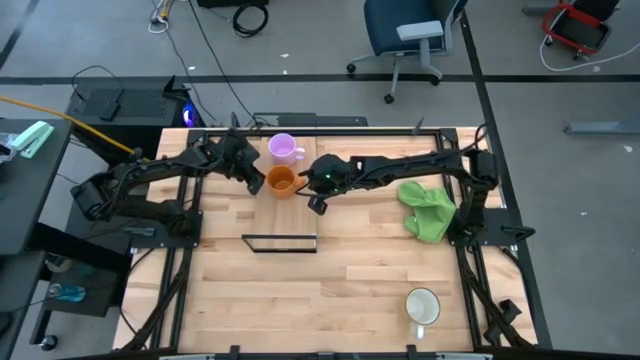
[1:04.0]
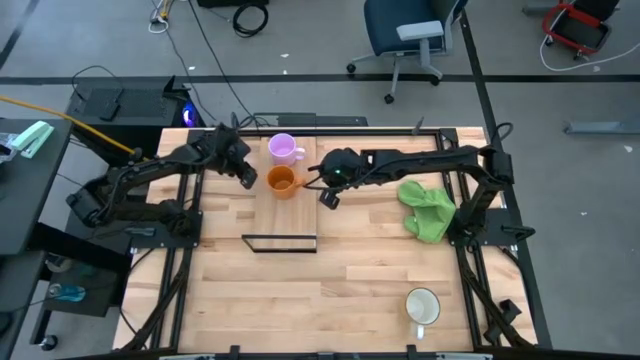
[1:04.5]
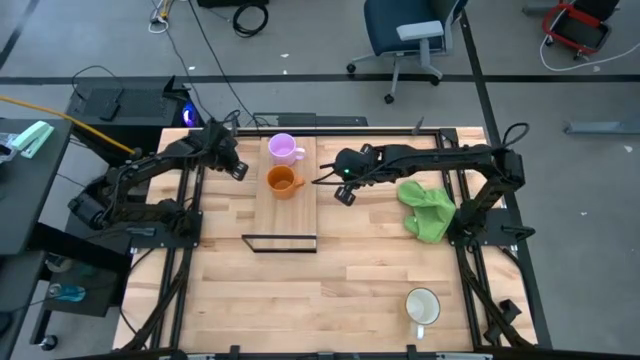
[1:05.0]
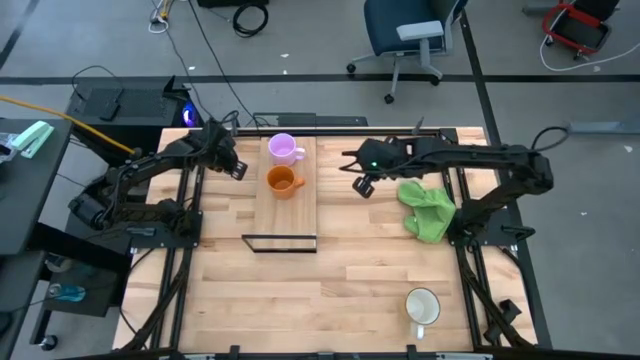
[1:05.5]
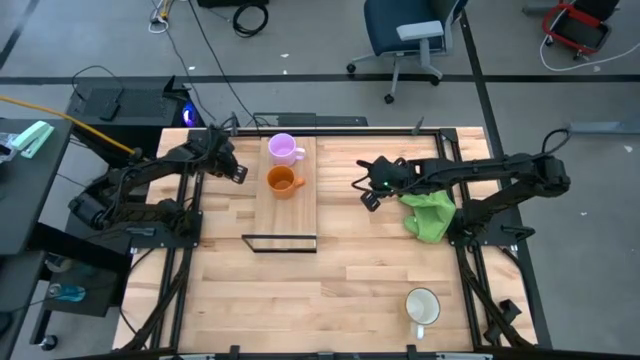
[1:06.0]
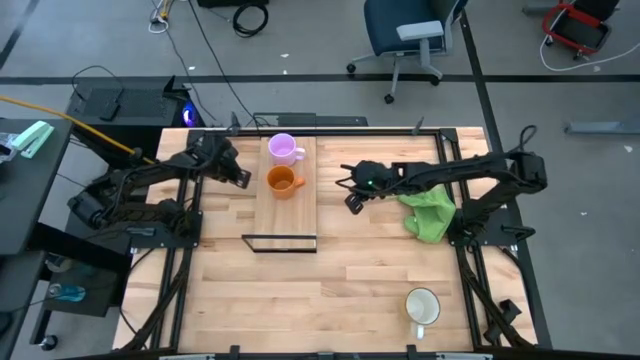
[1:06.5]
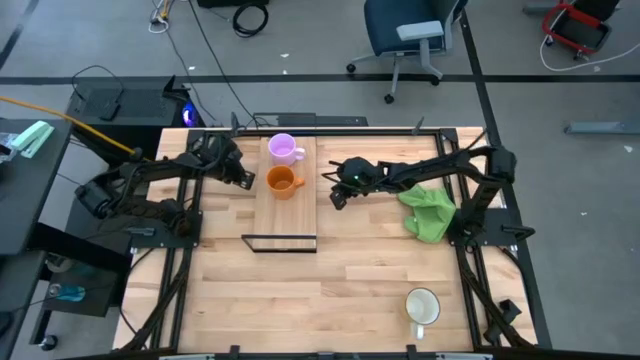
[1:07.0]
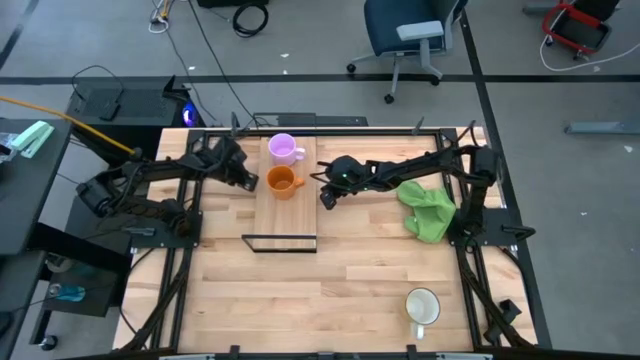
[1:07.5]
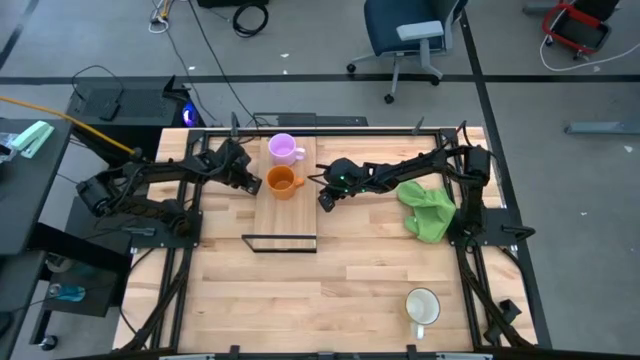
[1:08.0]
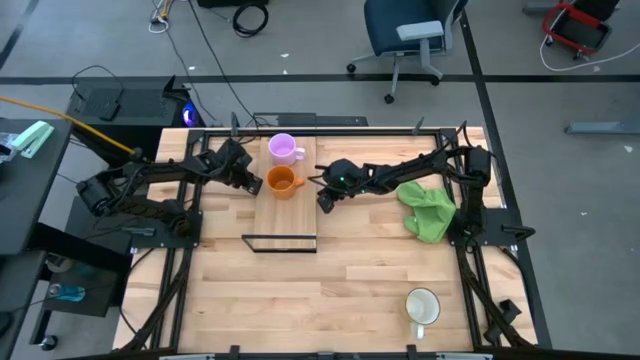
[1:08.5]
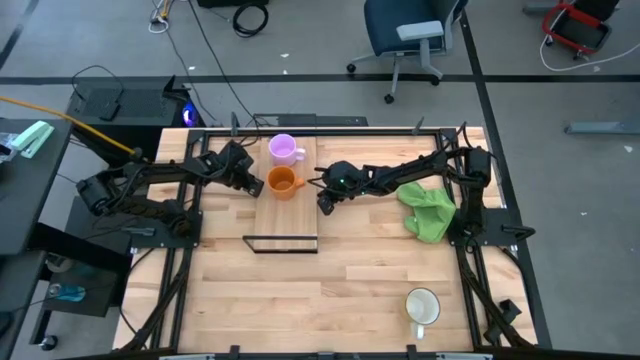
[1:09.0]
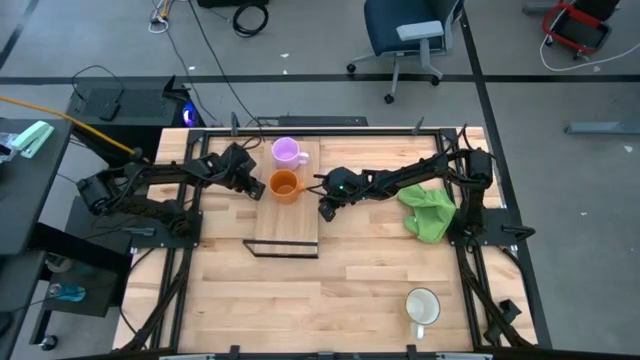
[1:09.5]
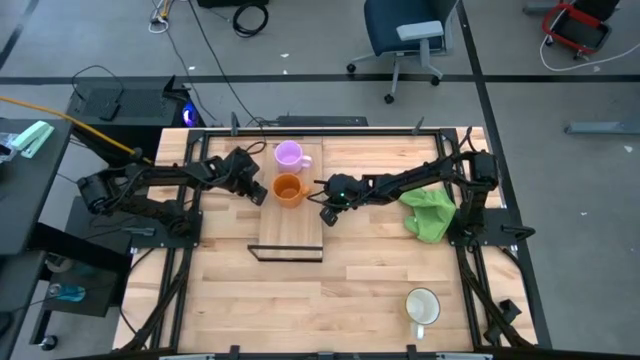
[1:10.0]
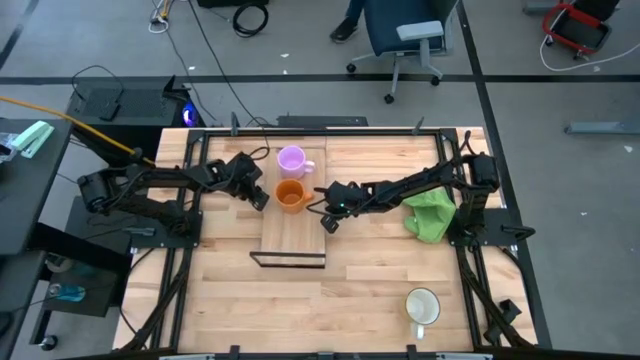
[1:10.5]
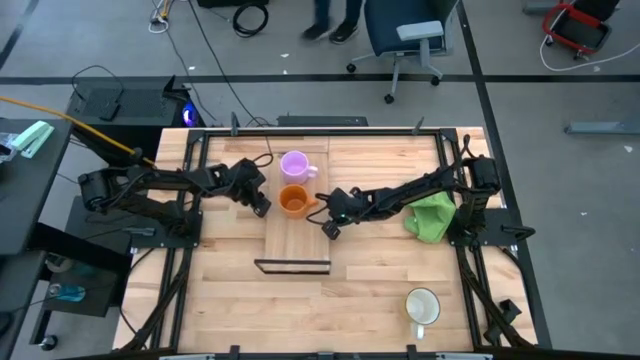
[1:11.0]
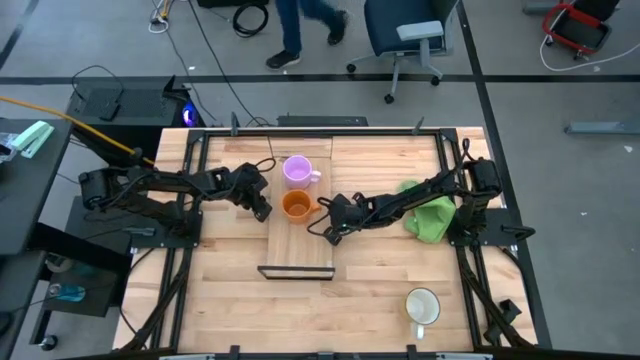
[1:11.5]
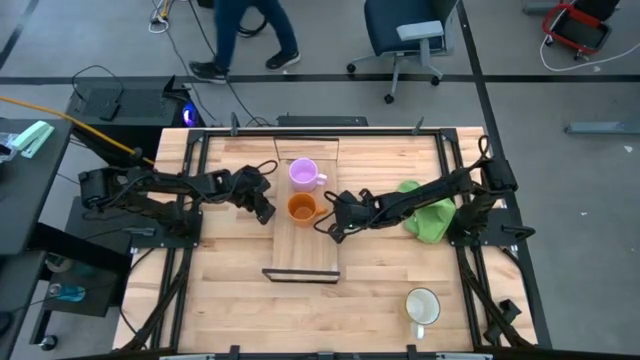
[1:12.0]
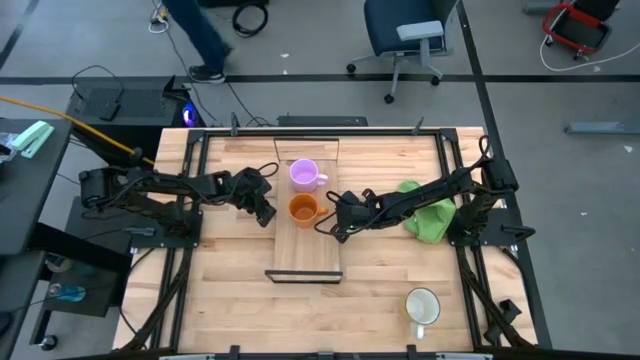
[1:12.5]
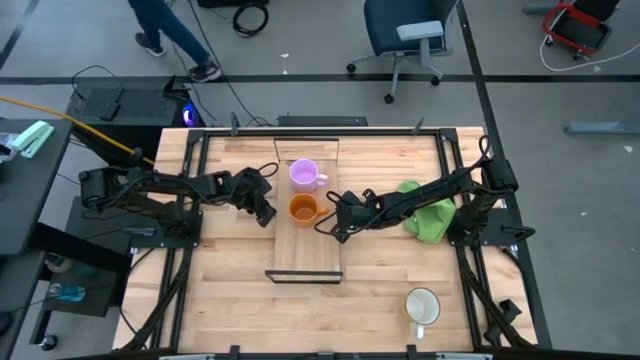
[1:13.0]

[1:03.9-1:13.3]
Task: Stack small to large cups/mugs on shelf
Move the shelf to the center of the table

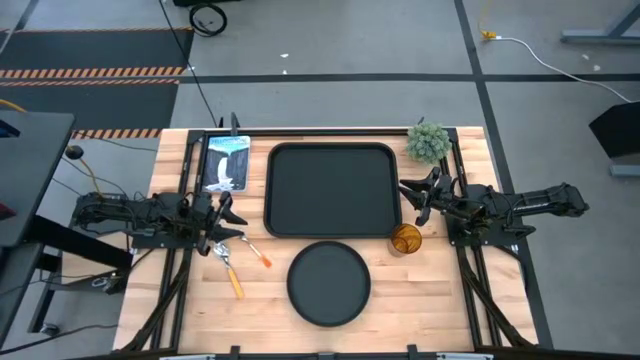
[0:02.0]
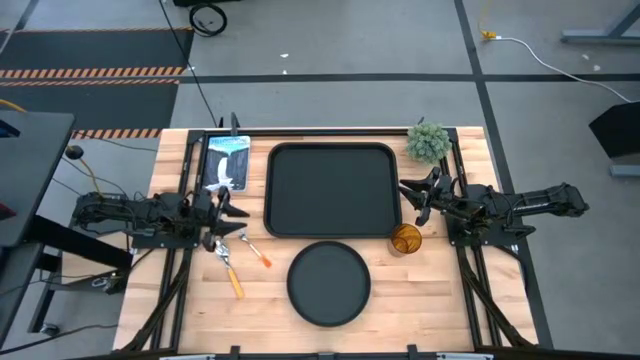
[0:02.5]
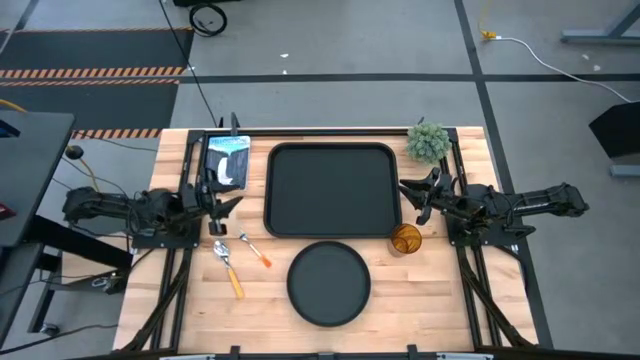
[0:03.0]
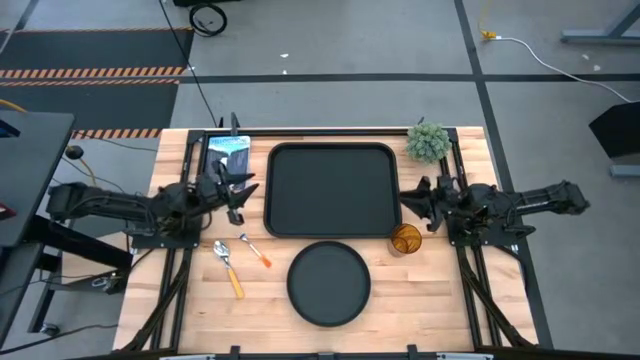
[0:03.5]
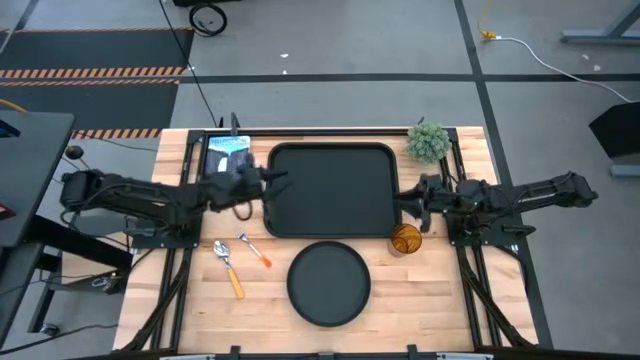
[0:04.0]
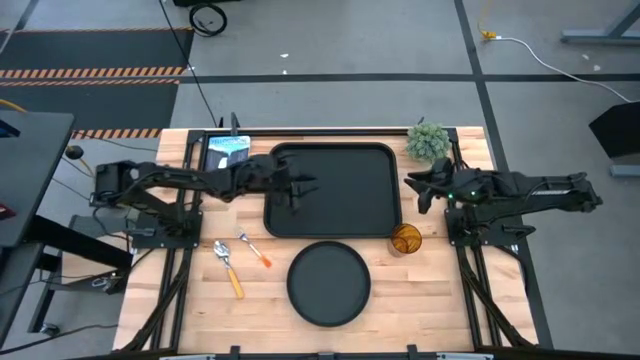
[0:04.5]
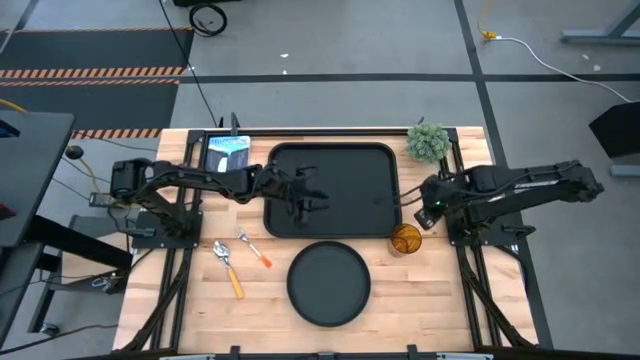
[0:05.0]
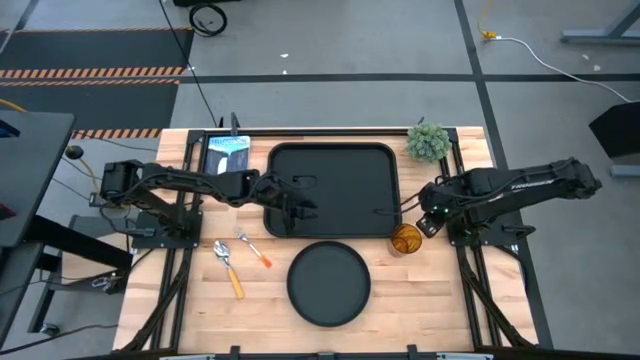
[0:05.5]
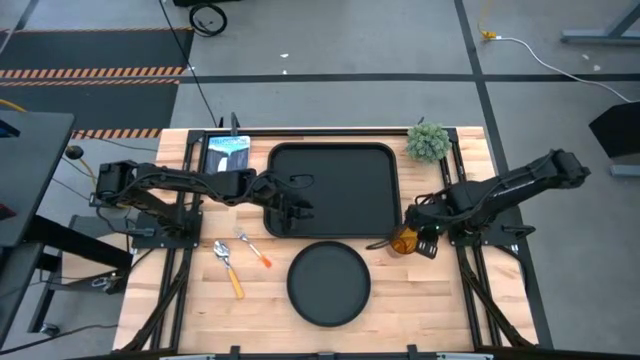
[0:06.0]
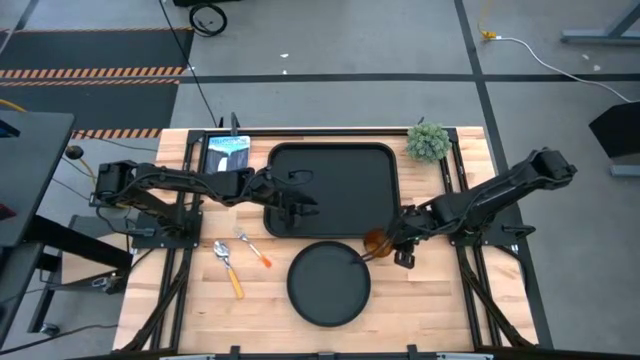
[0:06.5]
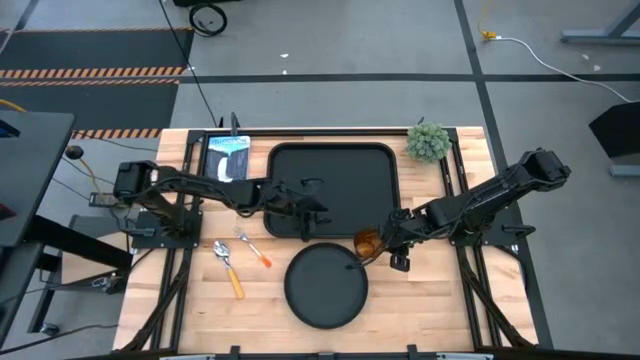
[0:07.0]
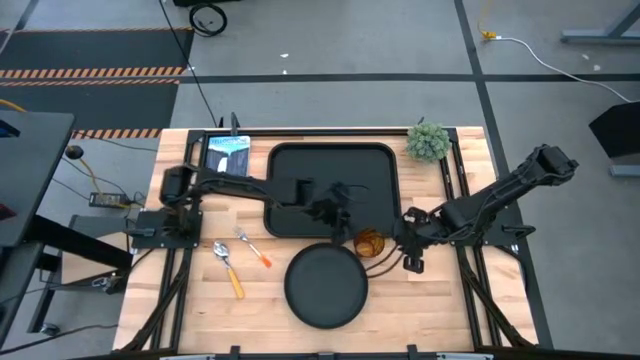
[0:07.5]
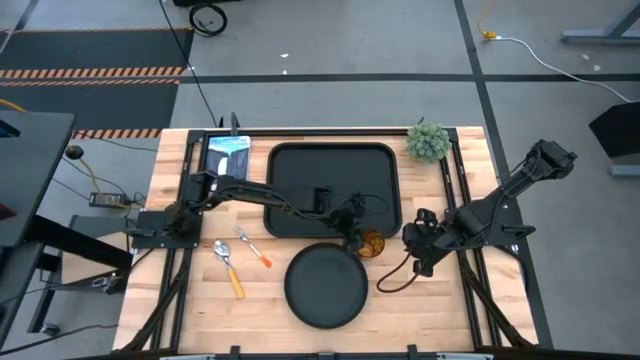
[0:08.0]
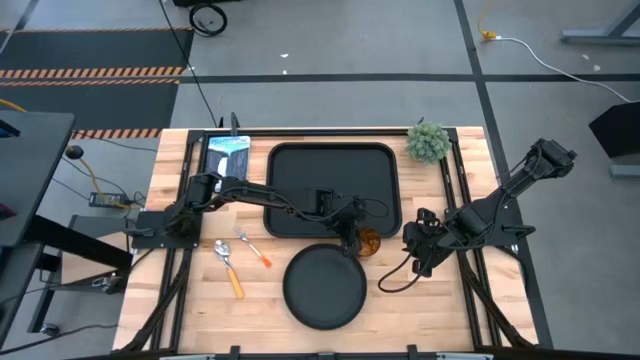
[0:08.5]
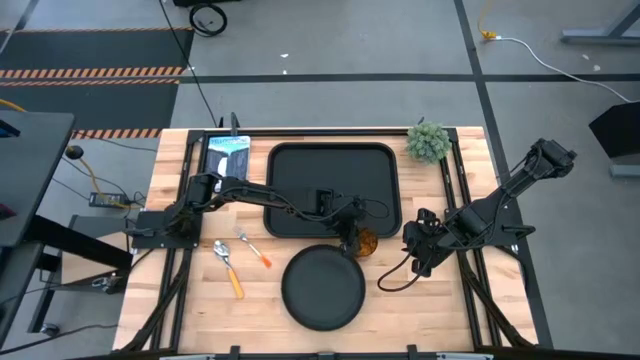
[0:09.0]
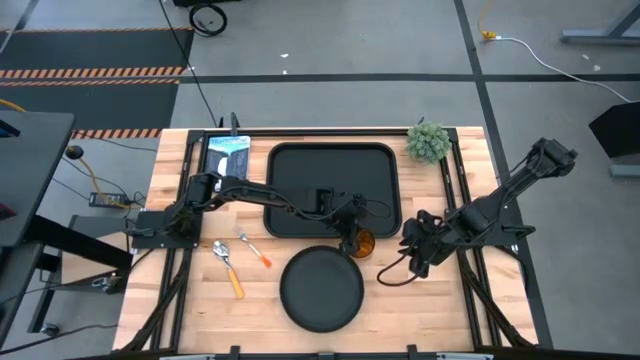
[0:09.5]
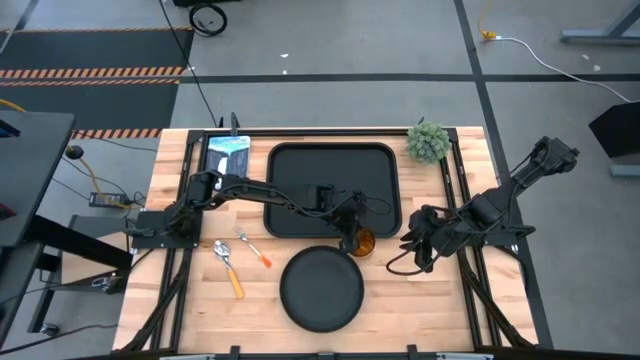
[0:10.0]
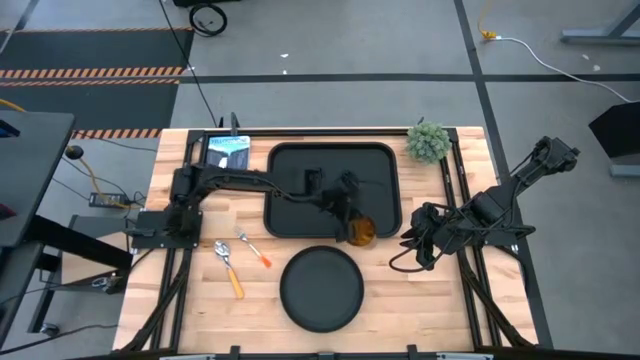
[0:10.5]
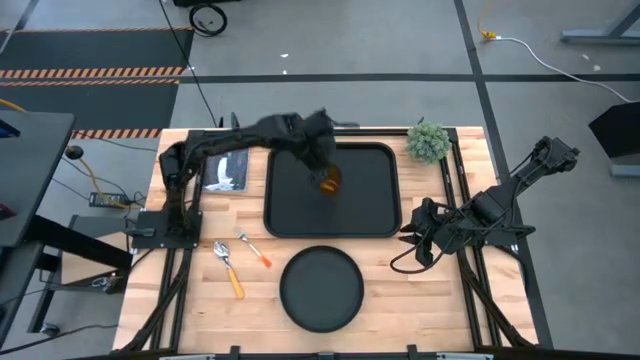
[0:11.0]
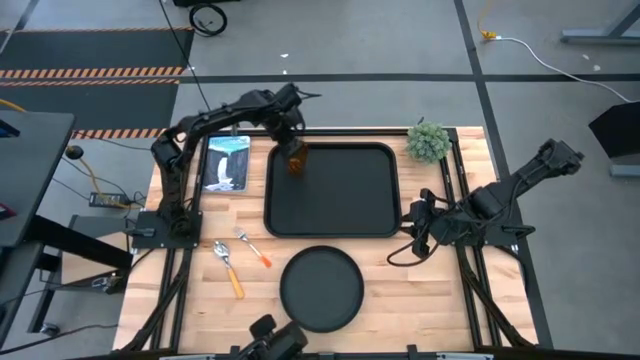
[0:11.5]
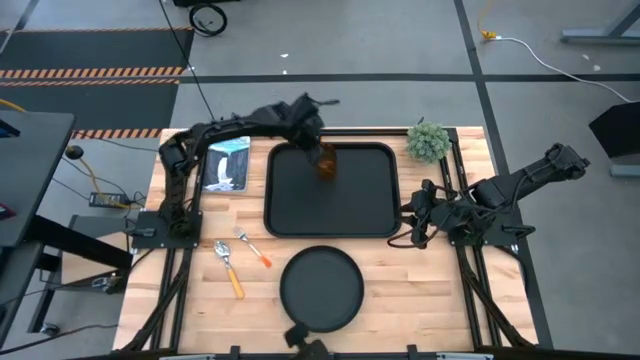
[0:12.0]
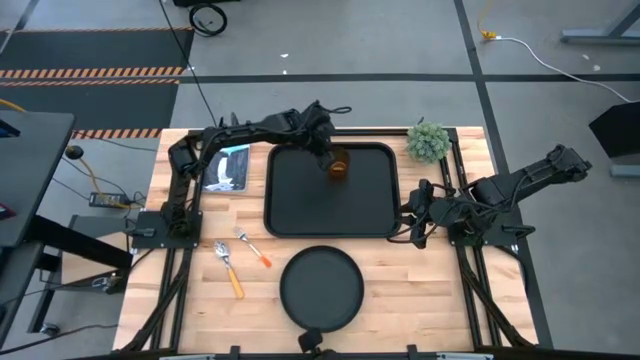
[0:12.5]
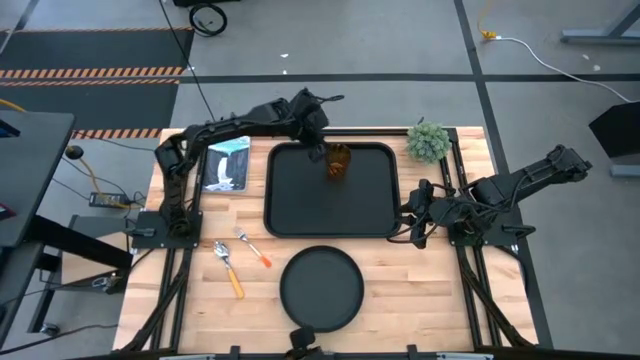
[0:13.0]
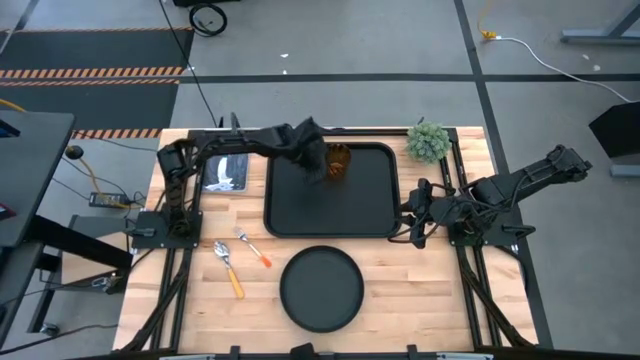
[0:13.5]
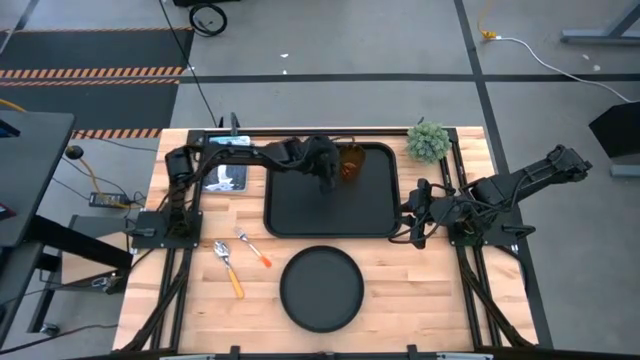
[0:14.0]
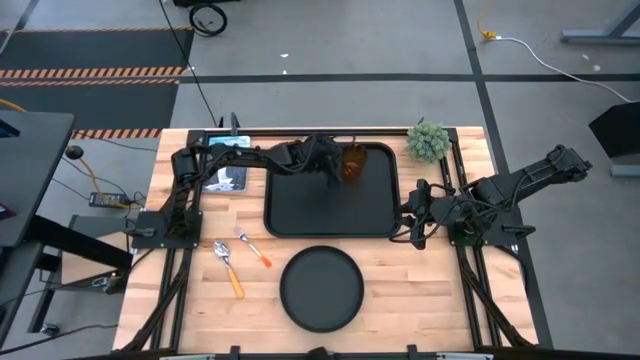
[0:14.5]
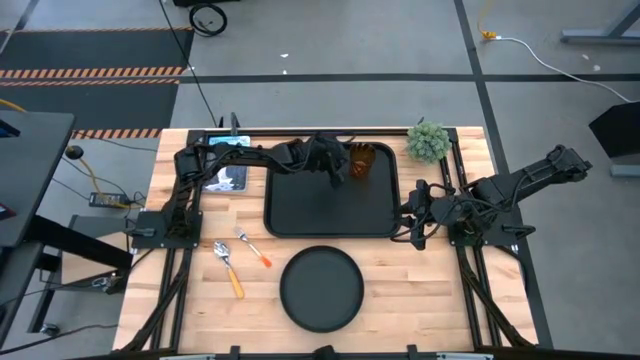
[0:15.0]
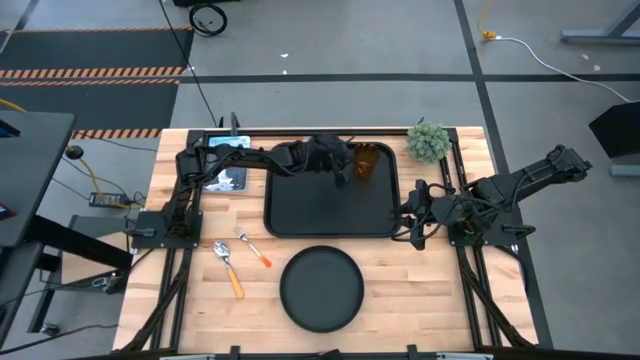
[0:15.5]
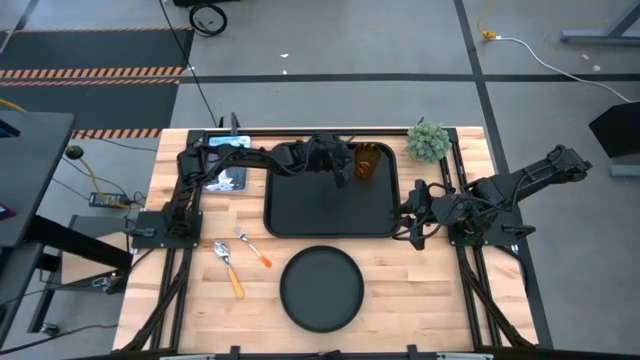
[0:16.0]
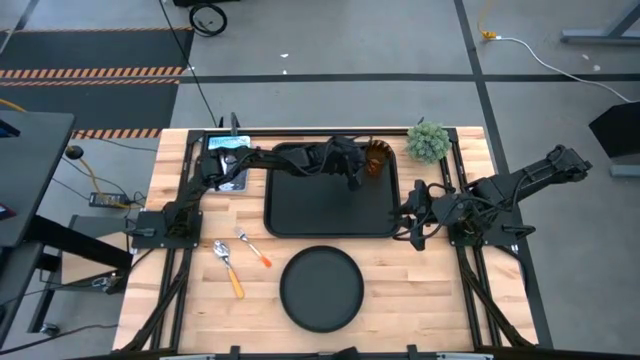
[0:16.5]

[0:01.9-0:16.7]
Task: Pick and place plate/cup/fork/spoon on tray
Put the orange cup on the black tray
